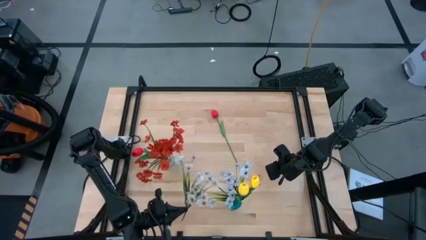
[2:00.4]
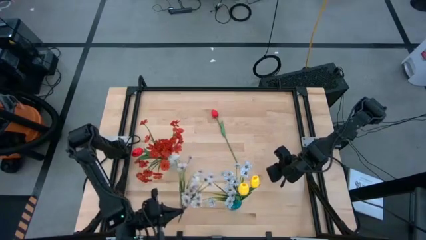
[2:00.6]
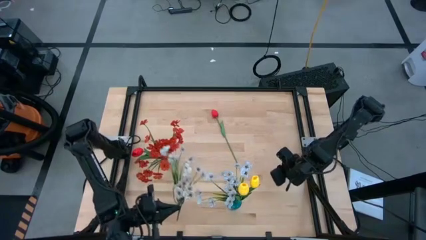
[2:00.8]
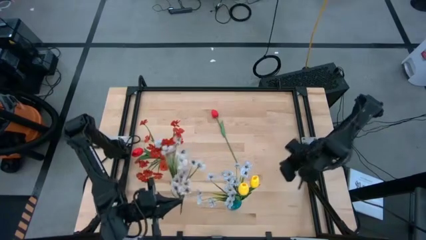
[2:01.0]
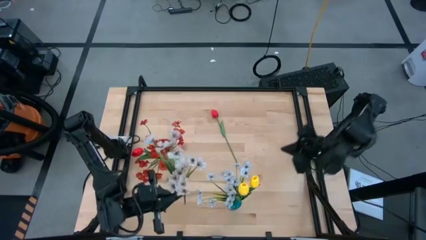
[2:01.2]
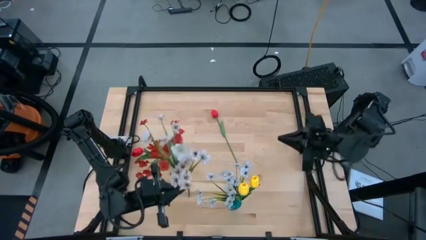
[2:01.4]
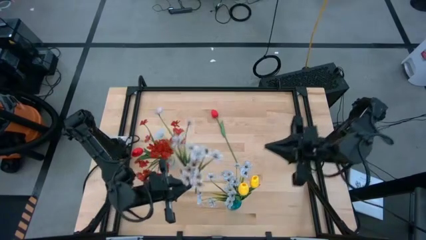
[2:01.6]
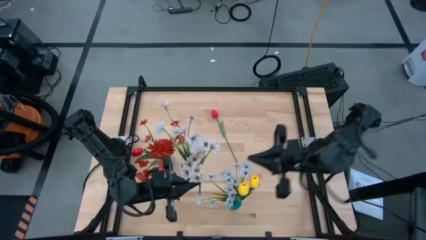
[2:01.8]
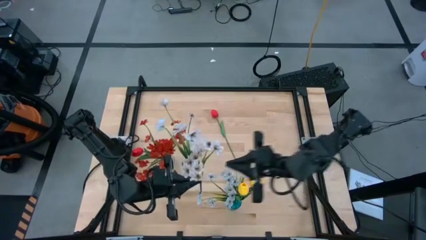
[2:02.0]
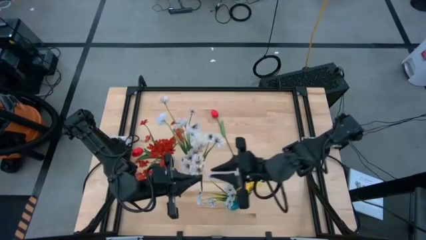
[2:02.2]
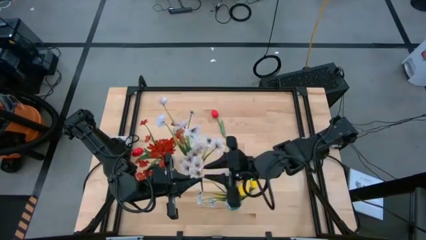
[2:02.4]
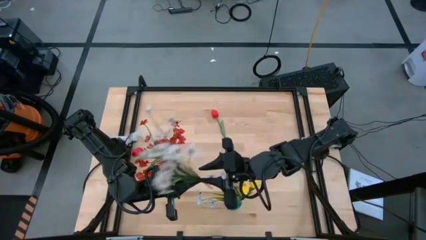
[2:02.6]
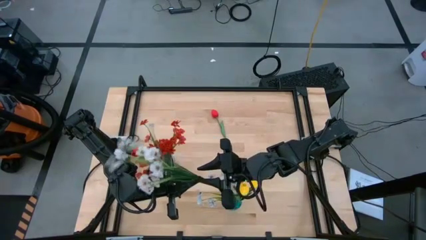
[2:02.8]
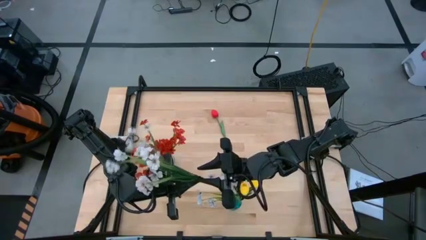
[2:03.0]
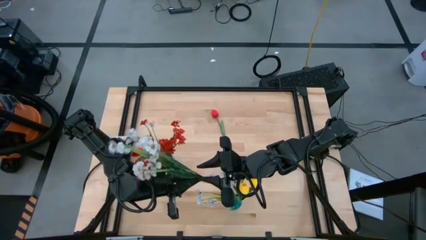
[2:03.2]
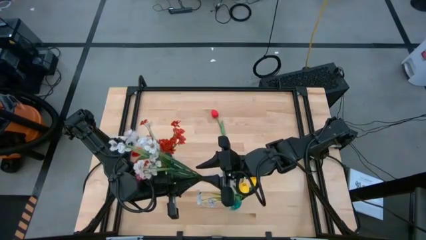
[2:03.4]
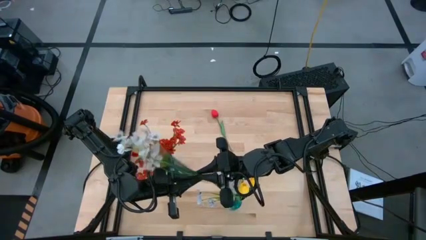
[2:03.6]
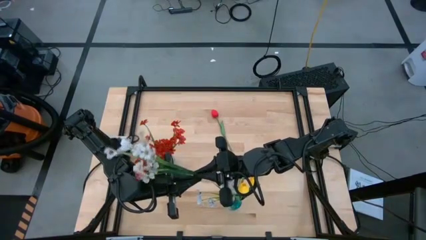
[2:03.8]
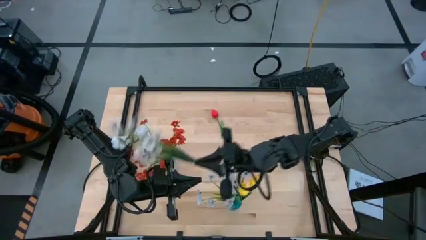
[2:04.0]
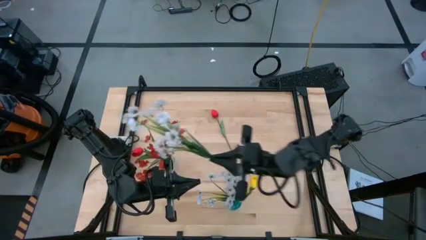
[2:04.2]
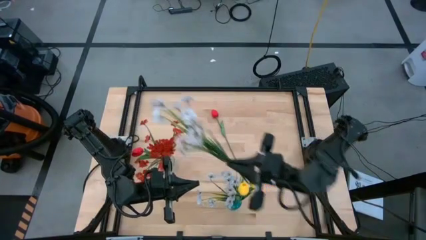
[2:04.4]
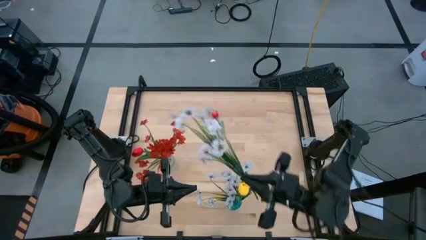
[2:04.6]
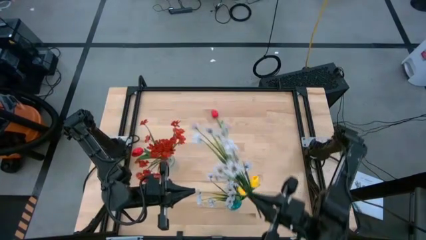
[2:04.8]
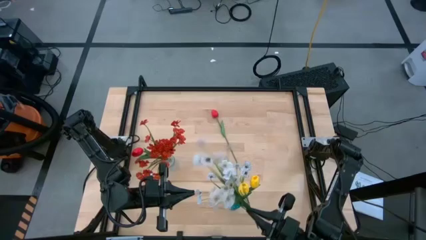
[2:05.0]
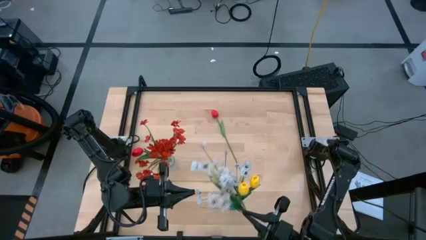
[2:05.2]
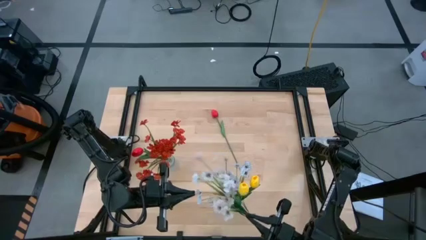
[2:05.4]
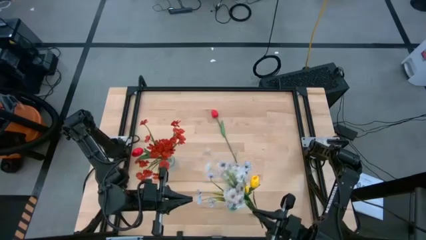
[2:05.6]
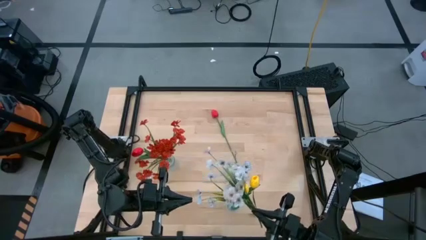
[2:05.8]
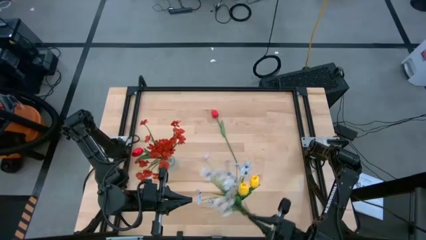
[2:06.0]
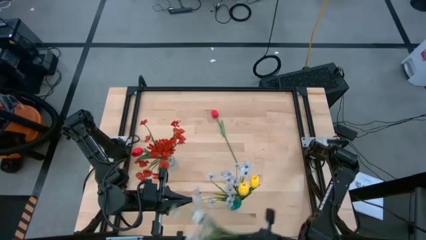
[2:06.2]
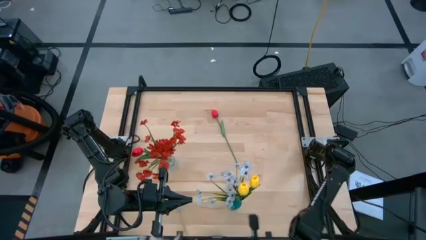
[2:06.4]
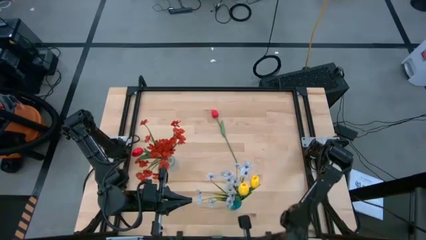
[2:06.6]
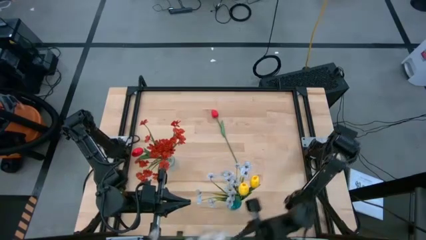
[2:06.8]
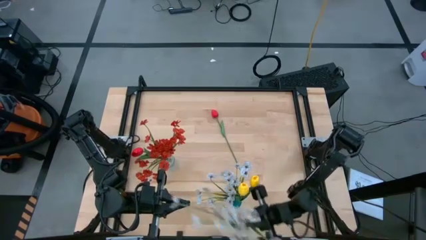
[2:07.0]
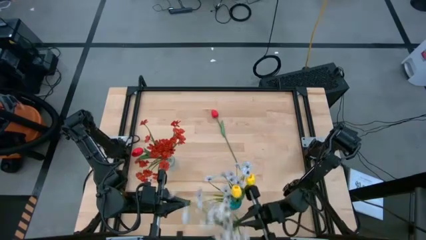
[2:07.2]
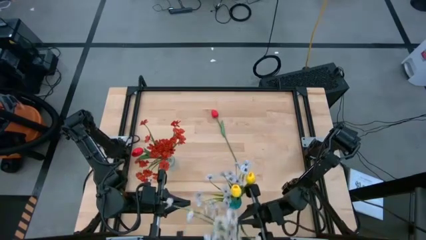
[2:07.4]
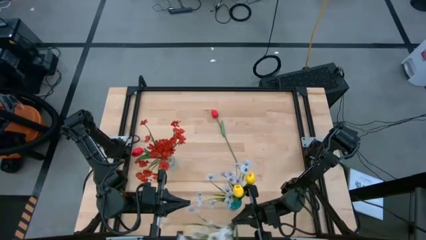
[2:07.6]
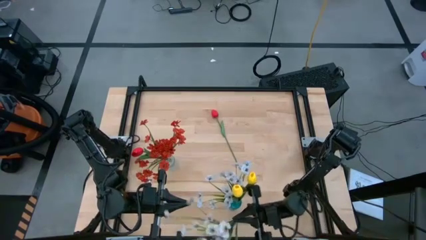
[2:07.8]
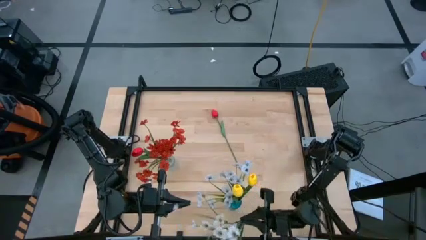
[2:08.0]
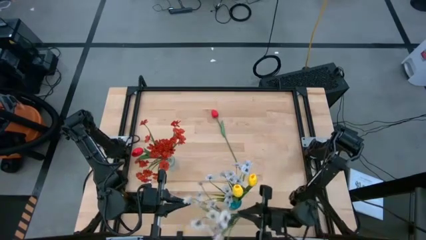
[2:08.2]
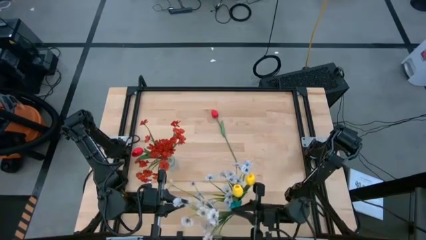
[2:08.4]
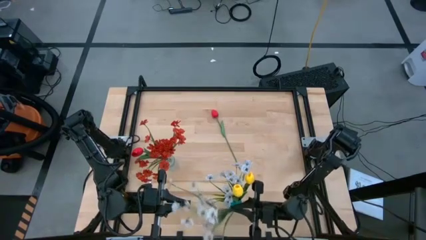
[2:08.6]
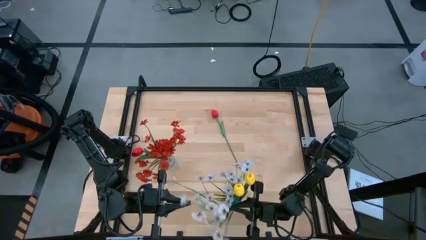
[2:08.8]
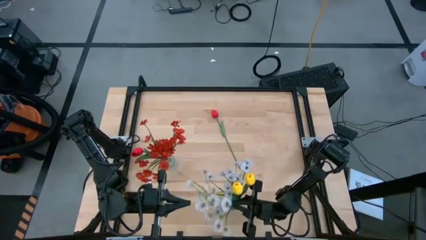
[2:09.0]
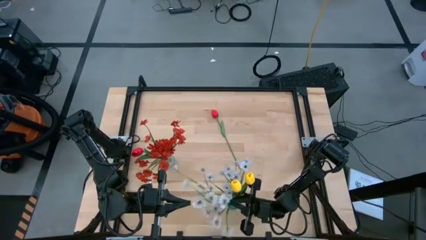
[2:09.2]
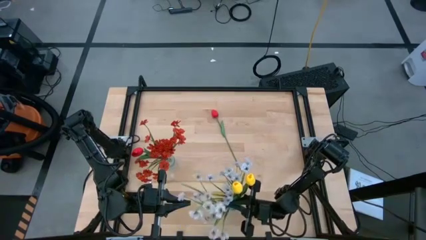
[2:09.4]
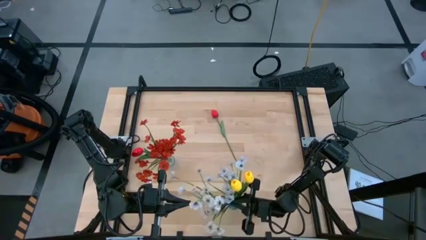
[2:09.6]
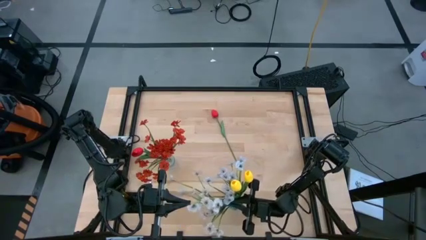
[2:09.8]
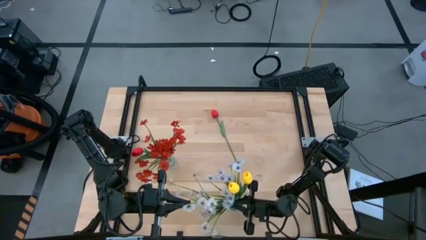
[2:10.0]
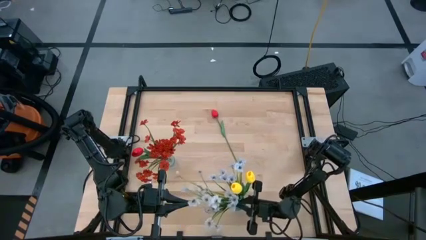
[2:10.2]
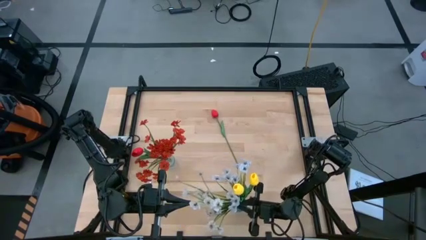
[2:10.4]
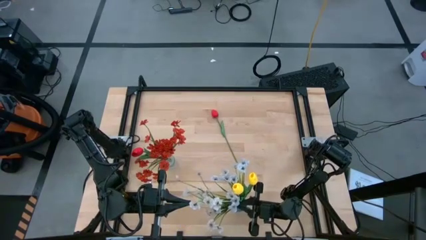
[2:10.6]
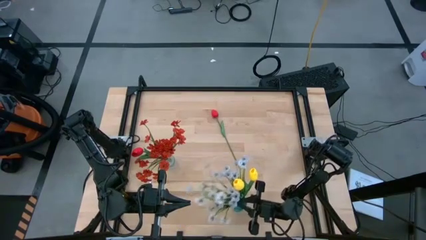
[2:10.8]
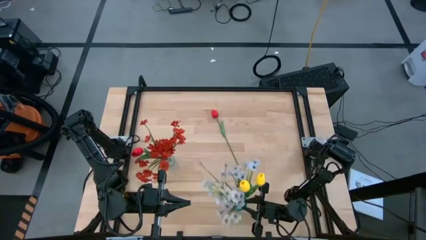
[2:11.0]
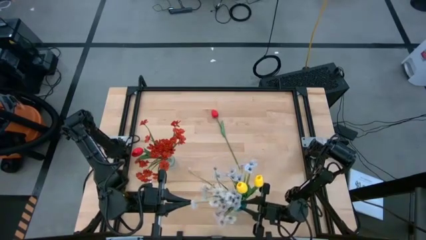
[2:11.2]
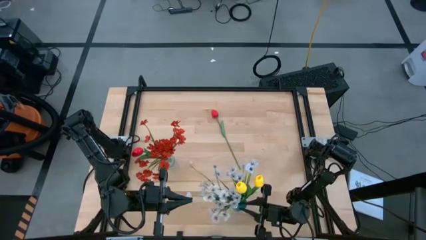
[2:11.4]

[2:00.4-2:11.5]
Task: Sort flowers into vase by color
Put the white flowers into the blue vase

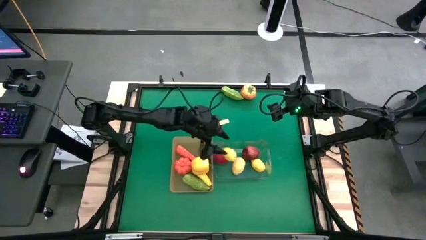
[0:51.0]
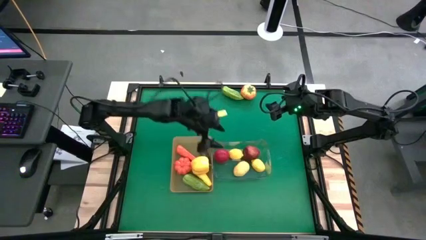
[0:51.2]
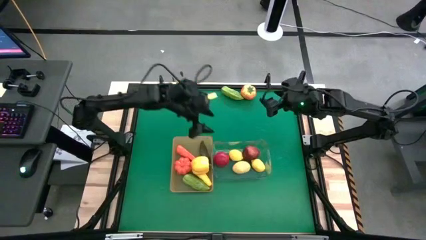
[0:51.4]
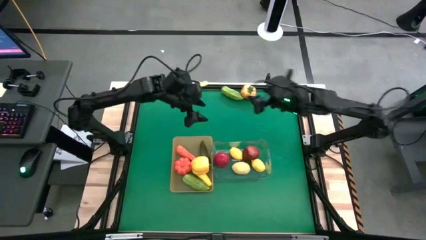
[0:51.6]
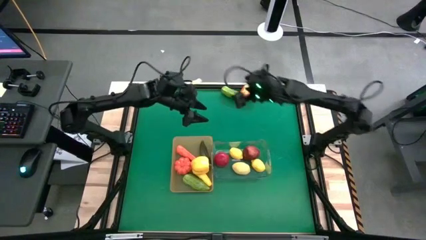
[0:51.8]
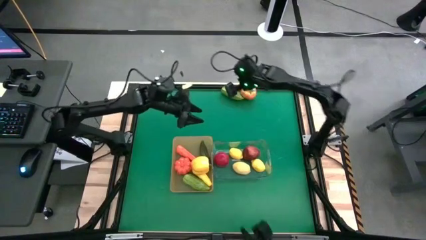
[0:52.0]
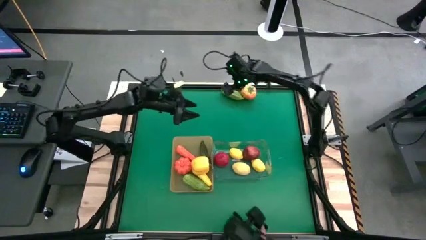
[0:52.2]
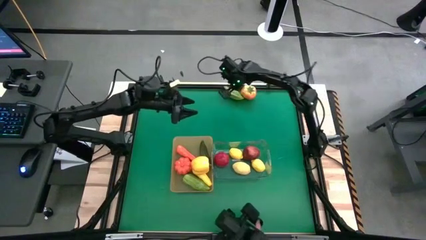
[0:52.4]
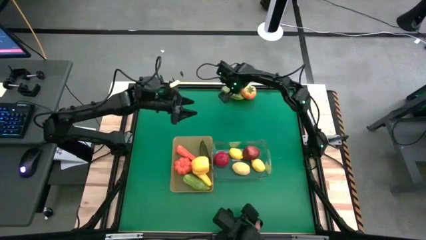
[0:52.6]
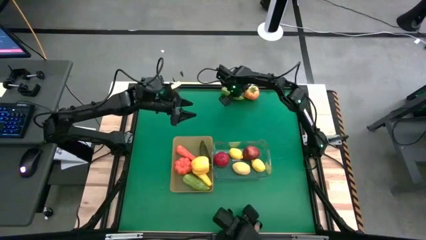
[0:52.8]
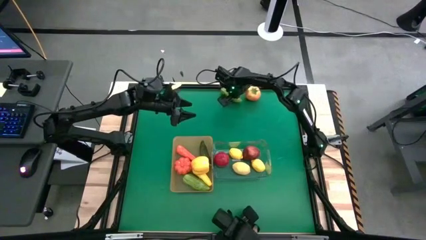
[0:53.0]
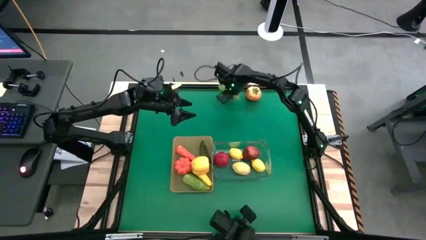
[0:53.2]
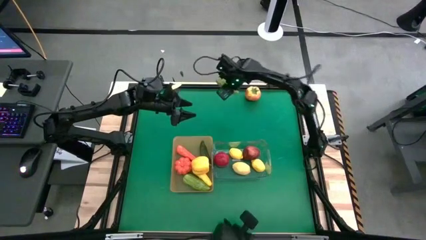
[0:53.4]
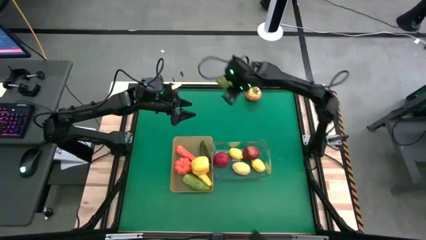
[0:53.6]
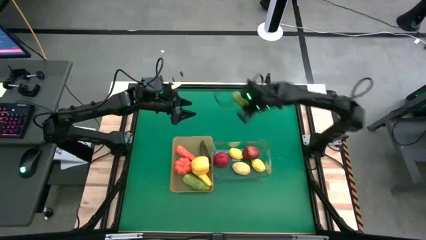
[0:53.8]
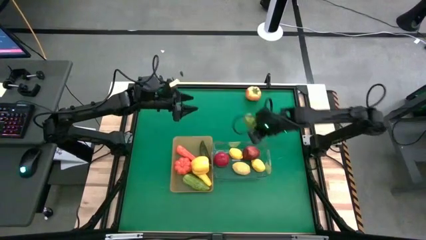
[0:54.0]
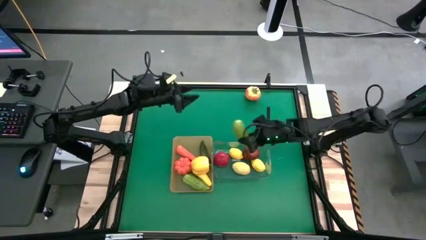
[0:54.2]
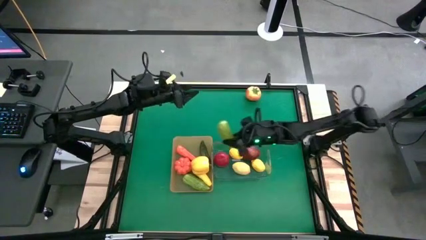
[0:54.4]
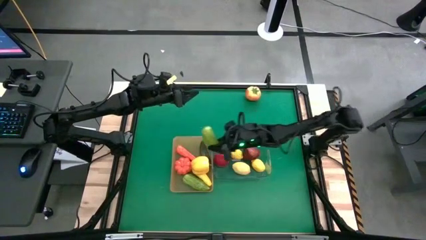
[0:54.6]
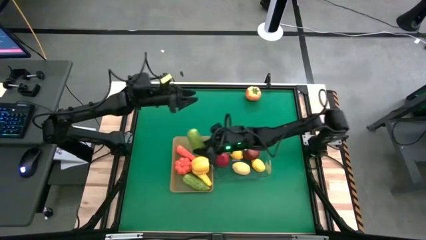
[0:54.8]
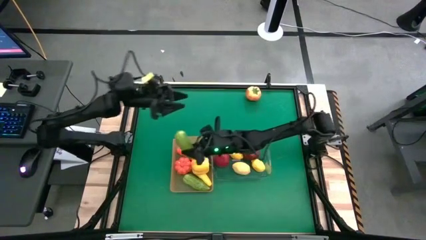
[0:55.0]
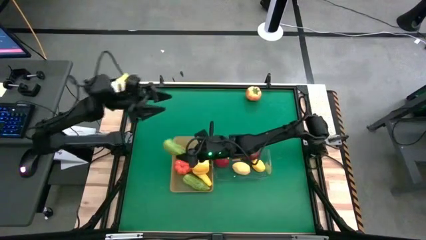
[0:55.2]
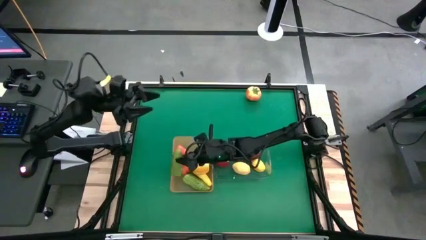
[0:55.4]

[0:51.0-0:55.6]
Task: Sort produce into baskets
Put the cucumber into the orange bin

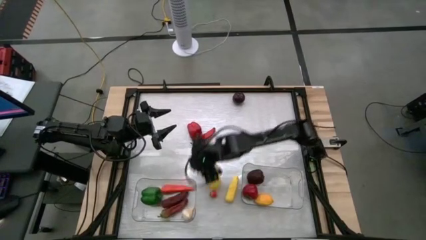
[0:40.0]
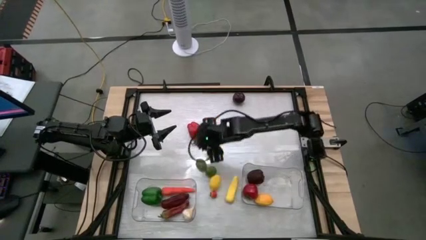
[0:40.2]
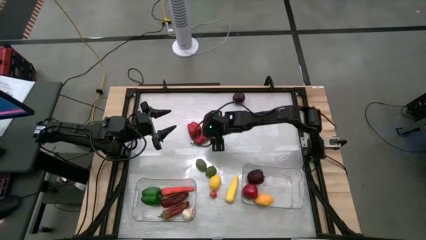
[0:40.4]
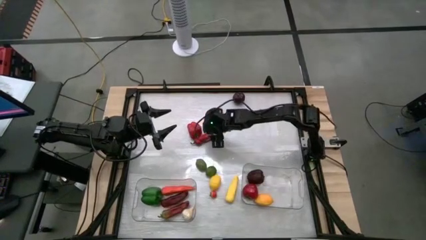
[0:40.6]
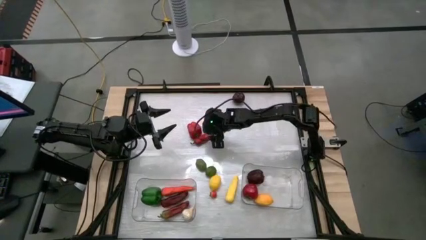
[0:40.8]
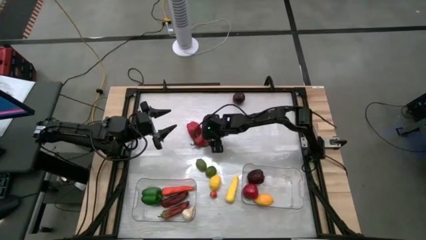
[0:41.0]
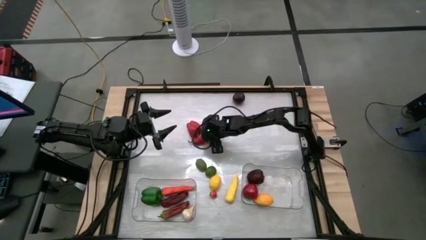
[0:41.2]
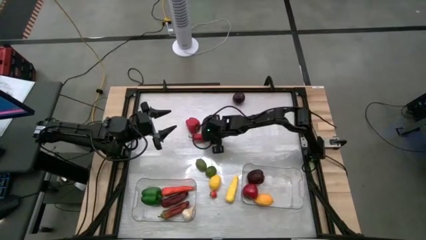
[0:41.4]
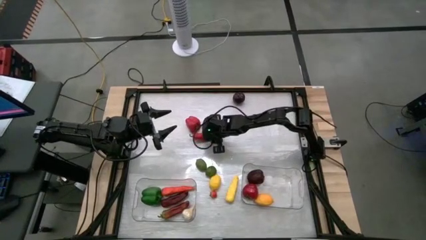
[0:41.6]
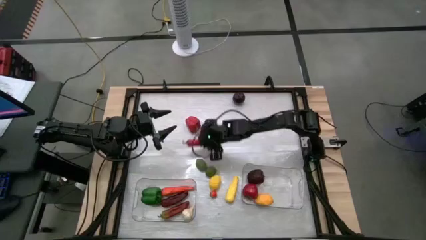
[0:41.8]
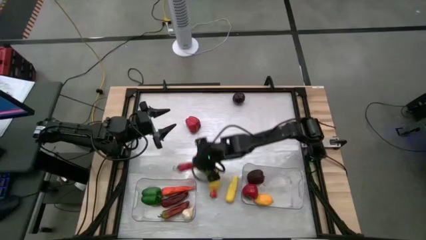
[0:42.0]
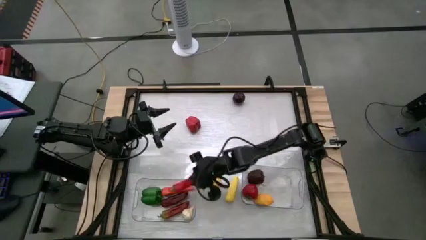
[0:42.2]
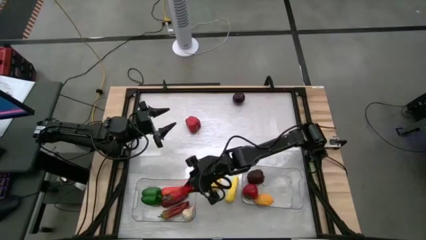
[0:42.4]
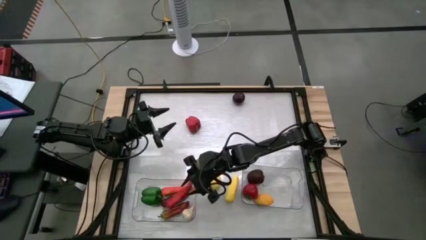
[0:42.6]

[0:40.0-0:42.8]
Task: Sort produce into baskets
Put the red chili bell pepper into the left transparent bin
